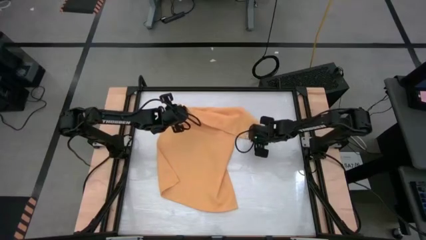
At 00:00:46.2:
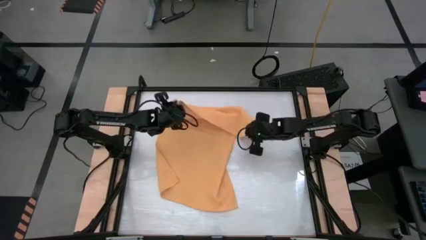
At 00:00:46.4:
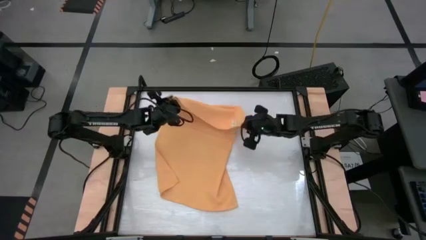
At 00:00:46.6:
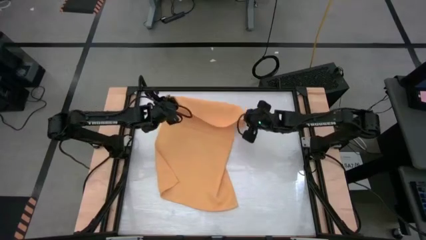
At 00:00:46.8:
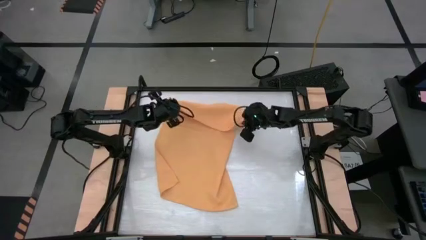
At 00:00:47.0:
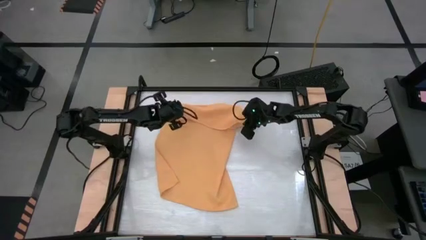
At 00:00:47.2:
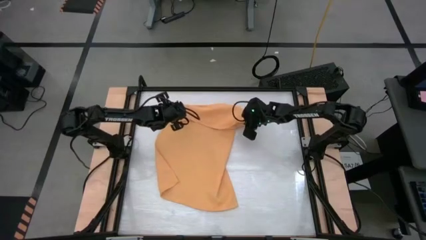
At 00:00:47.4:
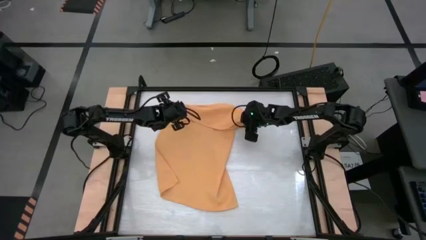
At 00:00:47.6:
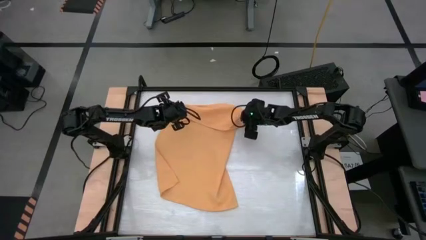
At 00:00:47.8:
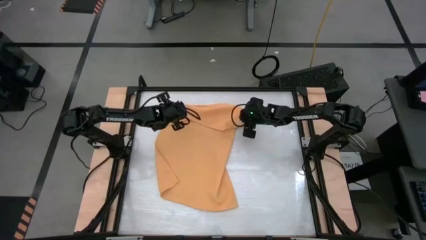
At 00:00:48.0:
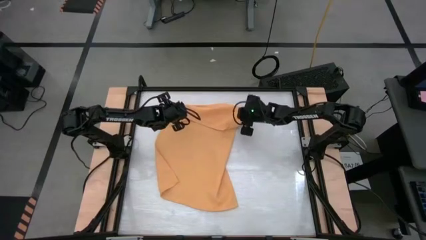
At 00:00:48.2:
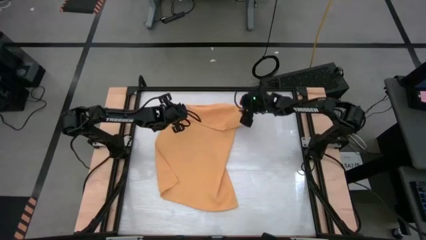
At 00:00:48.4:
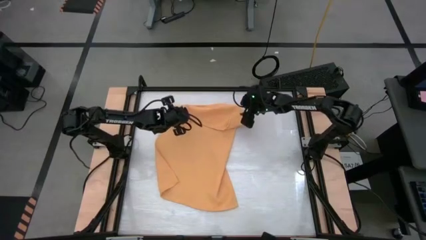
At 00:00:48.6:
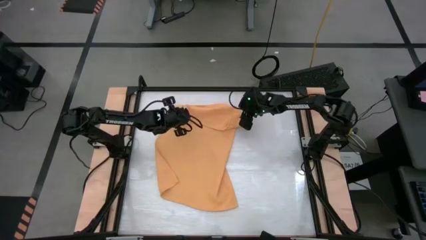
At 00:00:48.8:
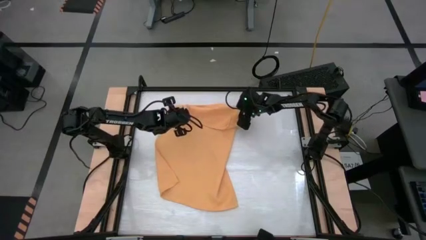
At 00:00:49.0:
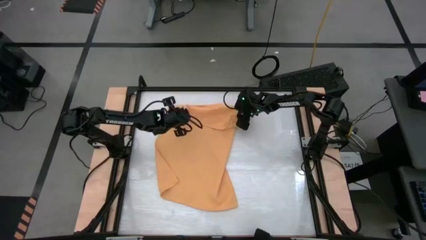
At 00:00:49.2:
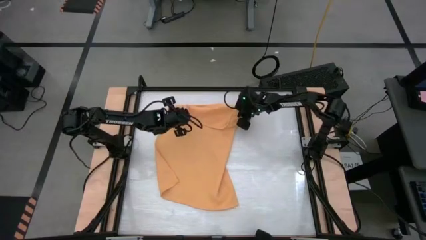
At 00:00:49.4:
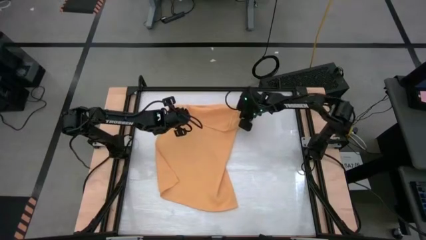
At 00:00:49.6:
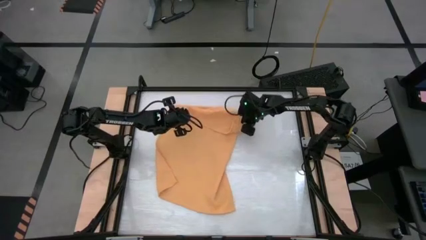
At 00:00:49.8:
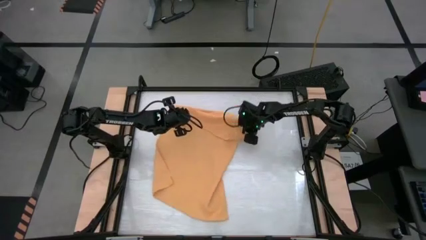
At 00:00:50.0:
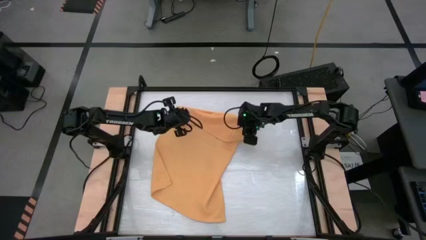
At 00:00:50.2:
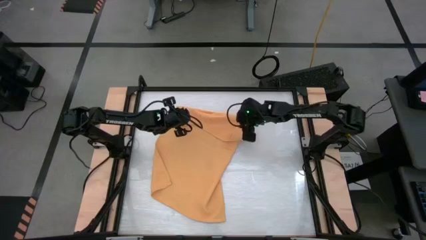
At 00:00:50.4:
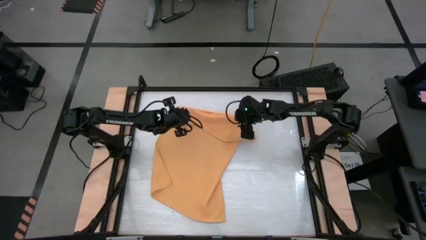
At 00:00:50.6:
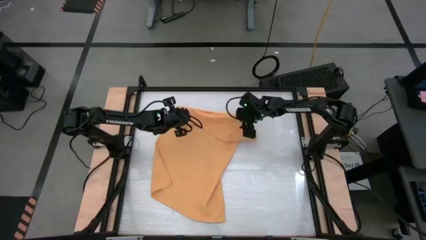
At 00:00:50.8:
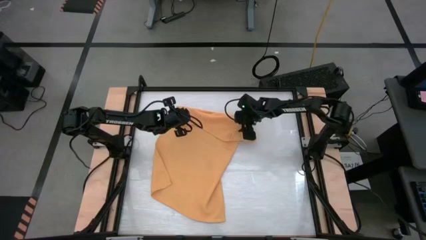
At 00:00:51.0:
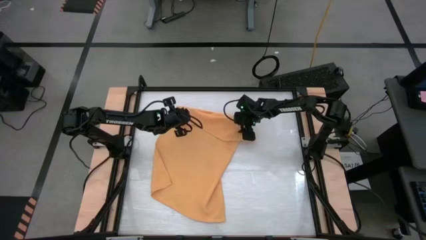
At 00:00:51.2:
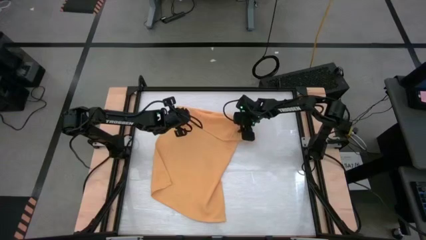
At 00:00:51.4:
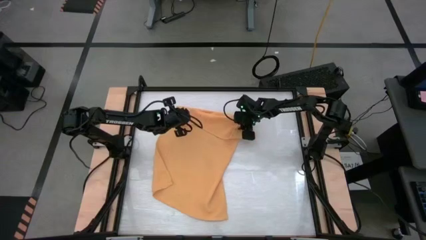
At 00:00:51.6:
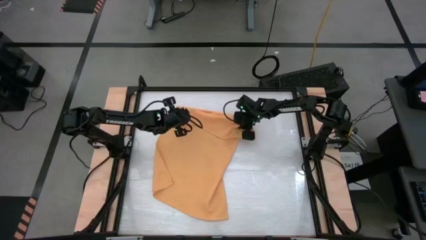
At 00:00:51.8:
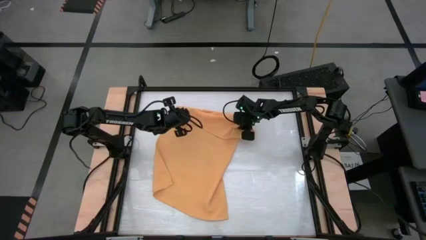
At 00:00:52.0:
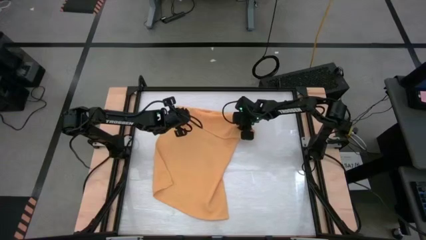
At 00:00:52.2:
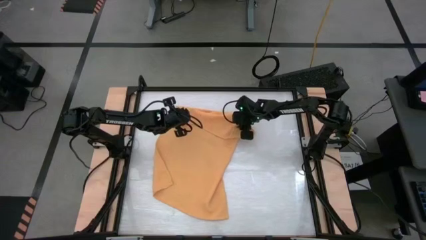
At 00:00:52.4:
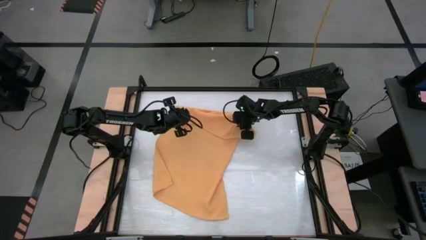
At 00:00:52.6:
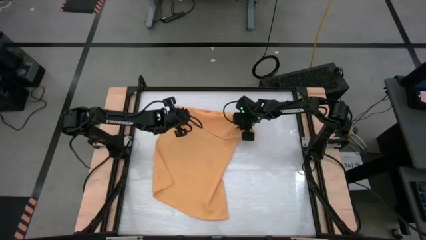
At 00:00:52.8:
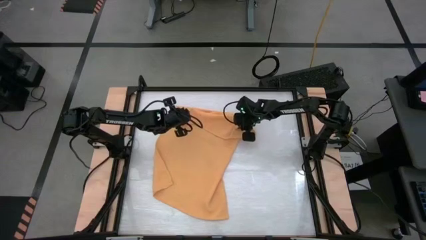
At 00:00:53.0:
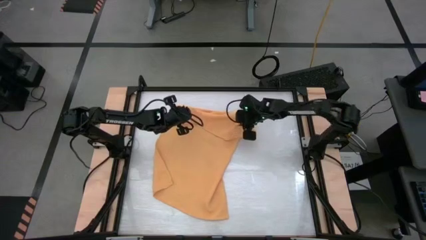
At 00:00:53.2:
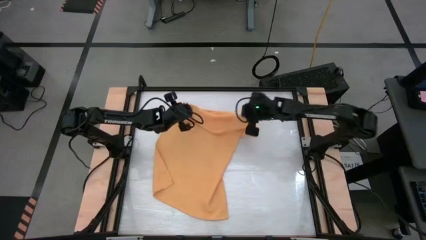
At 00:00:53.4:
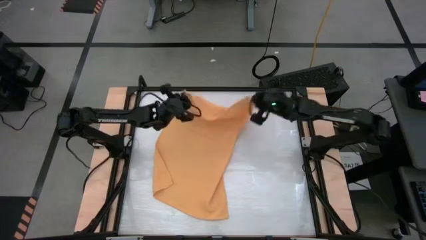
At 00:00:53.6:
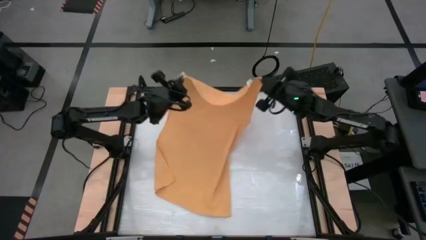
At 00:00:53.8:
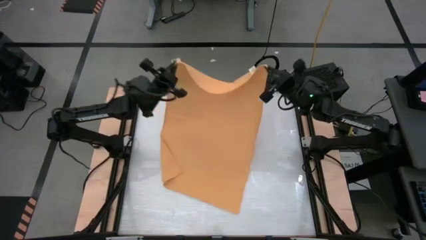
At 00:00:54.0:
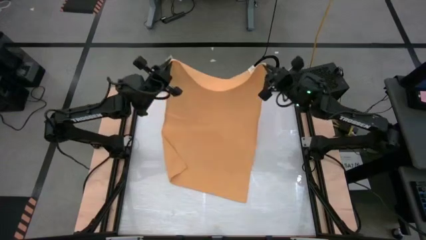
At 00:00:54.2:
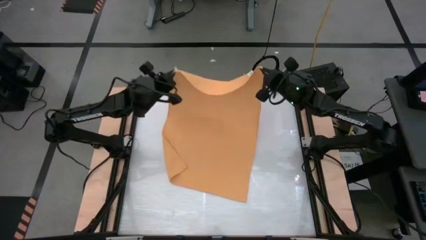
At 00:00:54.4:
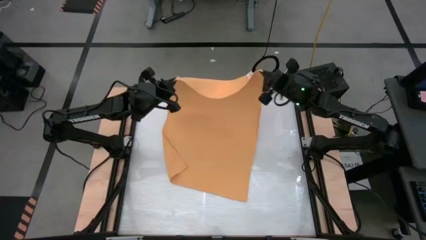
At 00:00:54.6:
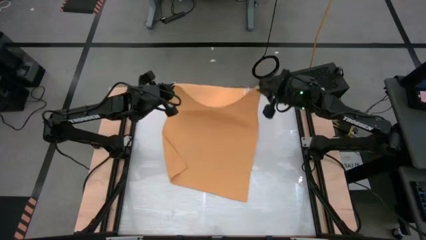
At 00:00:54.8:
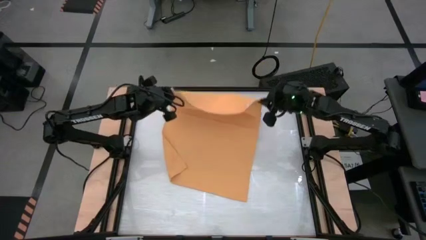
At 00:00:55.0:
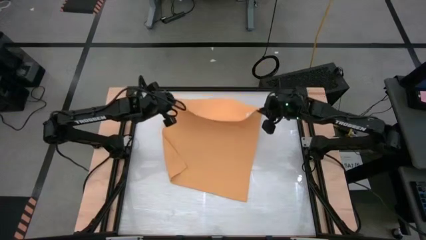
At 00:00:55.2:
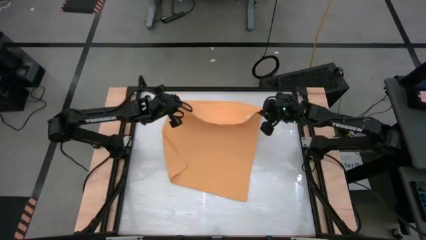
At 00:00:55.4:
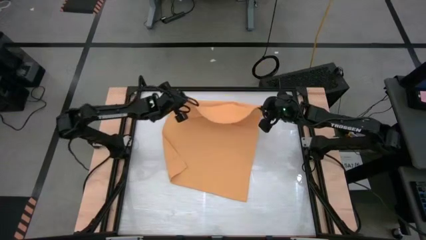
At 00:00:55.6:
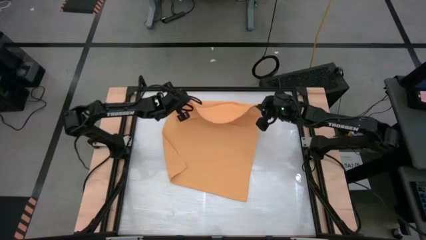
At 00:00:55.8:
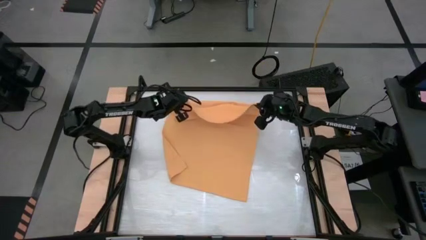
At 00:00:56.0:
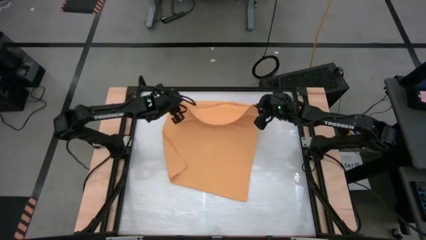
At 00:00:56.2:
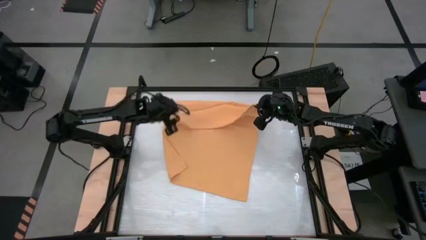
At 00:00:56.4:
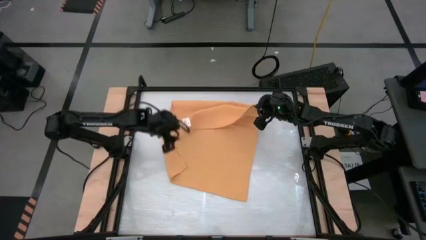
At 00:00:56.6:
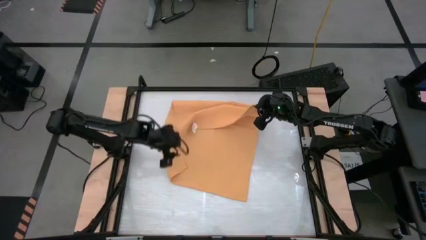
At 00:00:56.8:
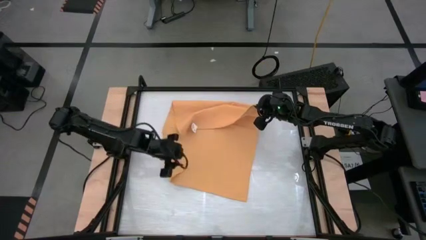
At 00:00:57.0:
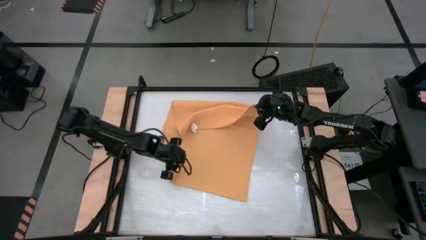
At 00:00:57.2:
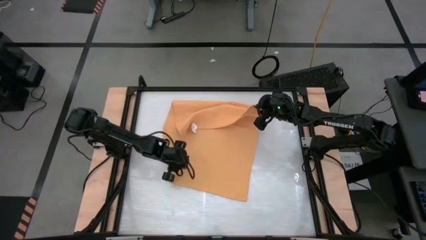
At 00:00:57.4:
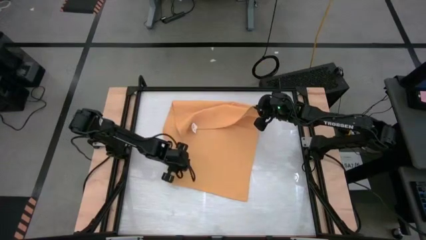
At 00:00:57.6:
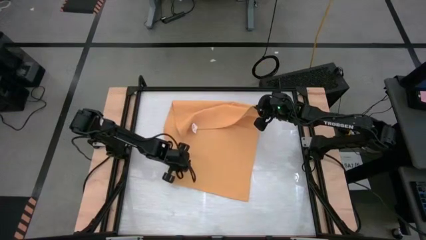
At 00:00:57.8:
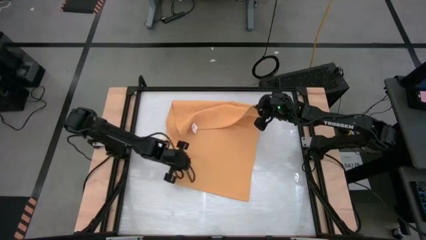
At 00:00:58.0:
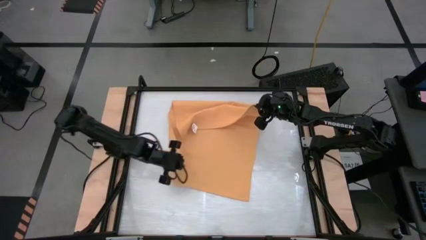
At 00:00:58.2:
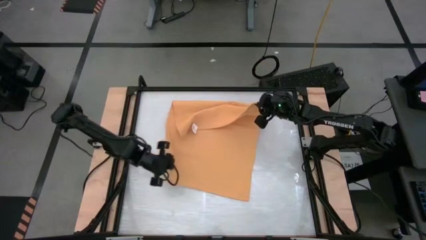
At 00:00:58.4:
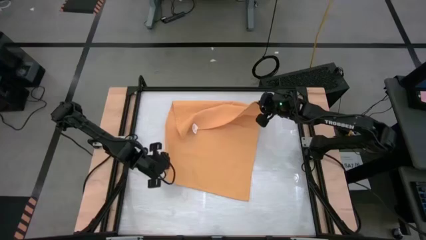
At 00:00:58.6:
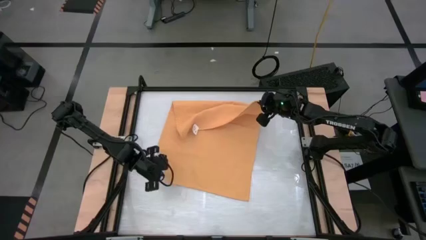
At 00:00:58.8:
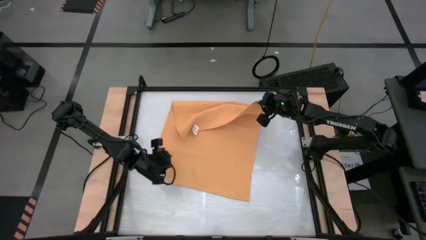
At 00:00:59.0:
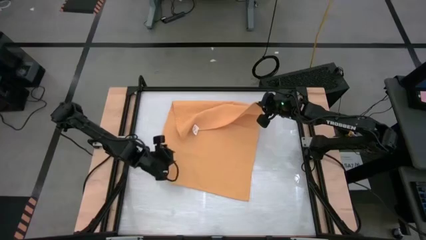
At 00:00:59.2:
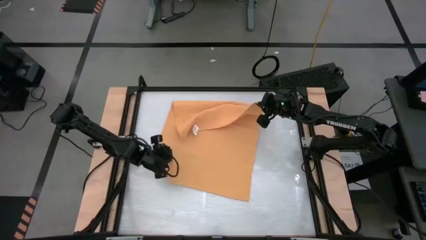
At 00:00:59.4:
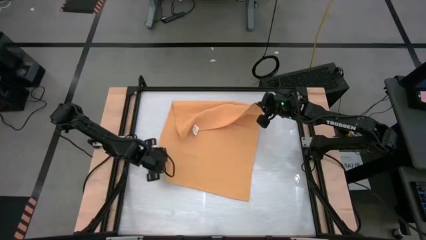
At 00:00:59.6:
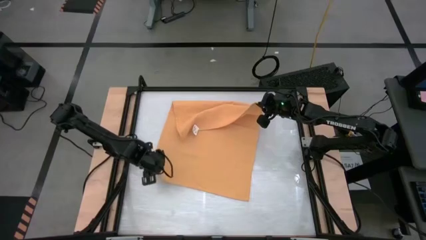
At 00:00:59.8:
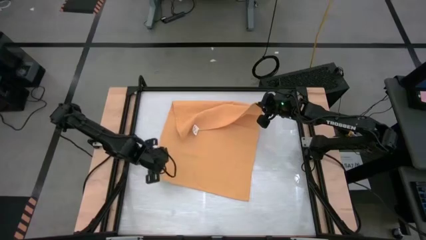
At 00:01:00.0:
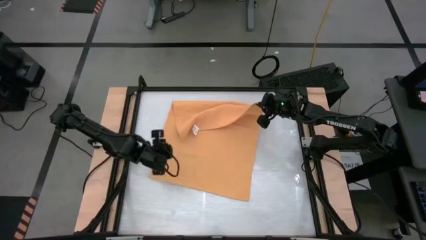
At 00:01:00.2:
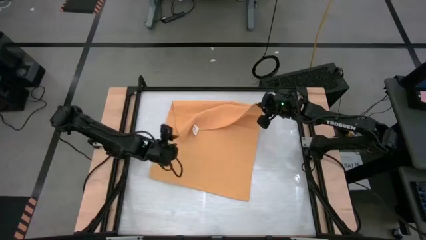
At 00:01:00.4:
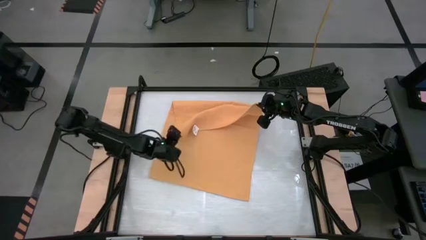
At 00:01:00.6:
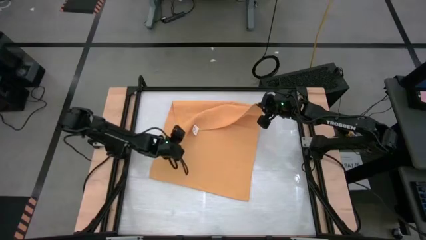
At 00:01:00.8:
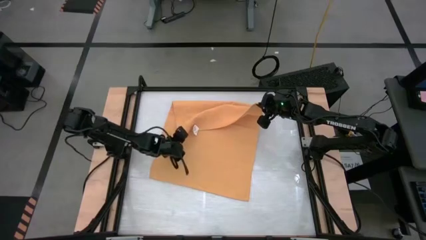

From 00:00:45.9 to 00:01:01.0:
Task: Roll towel
Roll the yellow towel
